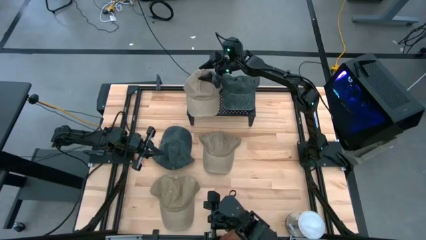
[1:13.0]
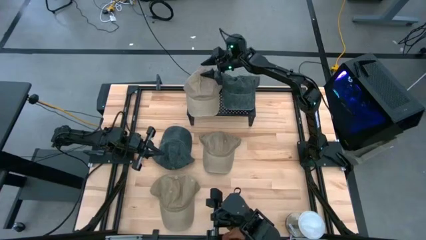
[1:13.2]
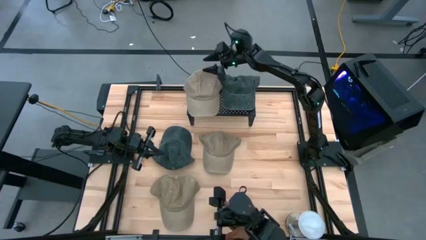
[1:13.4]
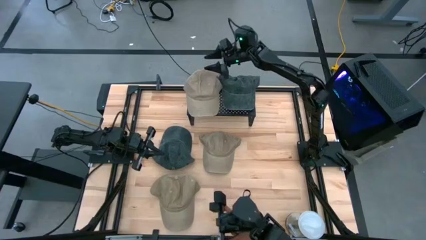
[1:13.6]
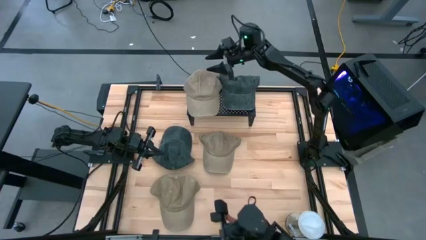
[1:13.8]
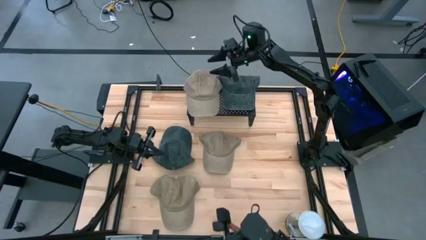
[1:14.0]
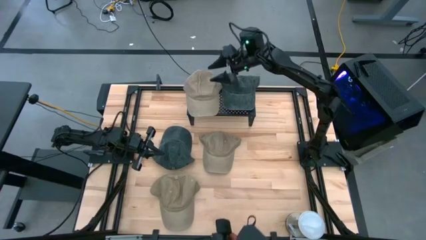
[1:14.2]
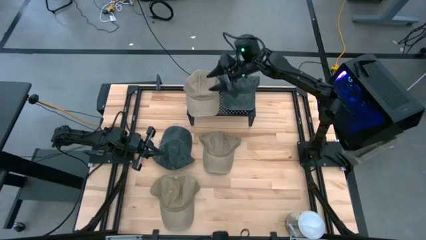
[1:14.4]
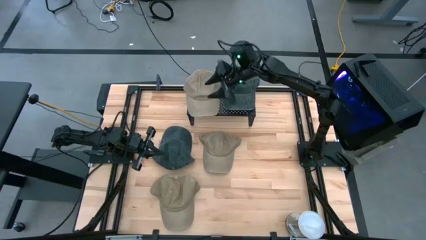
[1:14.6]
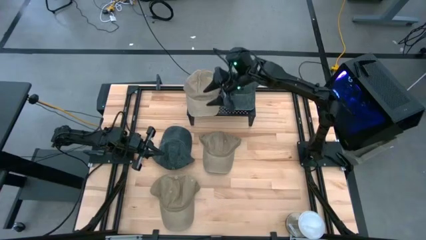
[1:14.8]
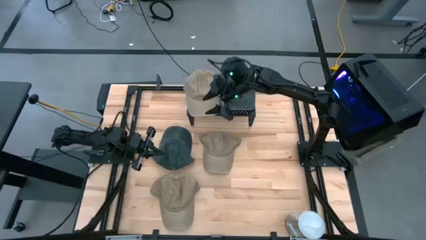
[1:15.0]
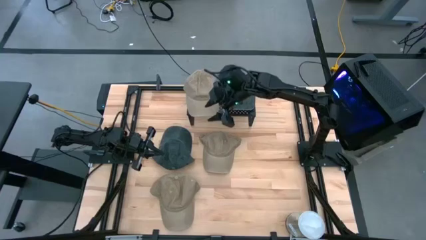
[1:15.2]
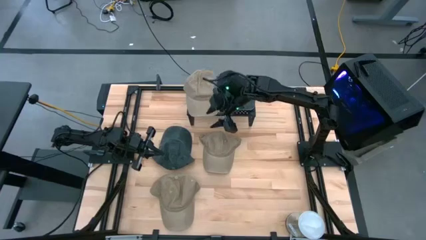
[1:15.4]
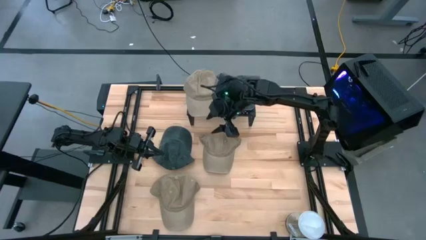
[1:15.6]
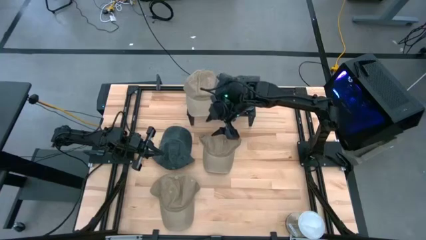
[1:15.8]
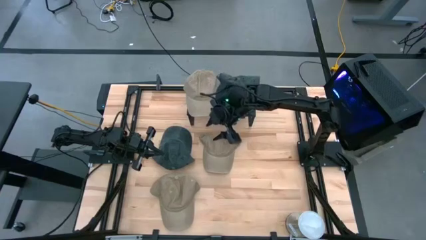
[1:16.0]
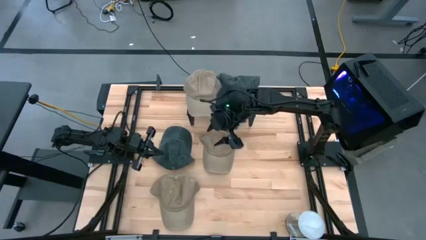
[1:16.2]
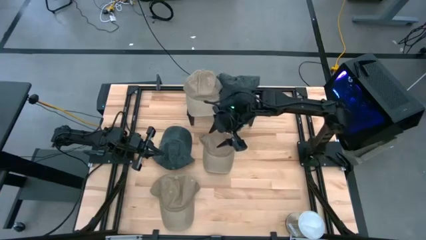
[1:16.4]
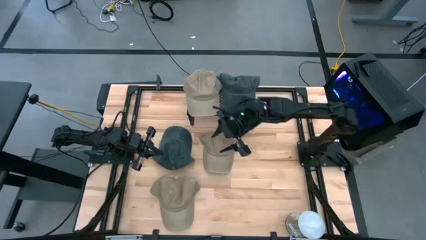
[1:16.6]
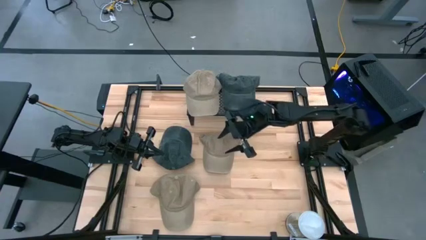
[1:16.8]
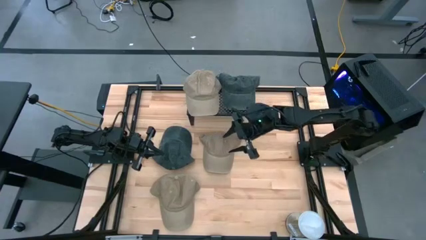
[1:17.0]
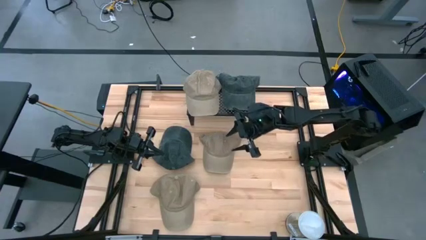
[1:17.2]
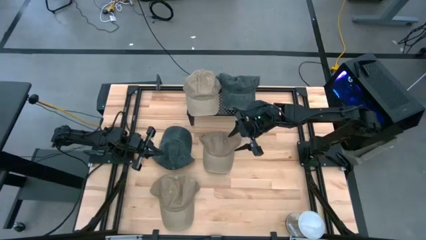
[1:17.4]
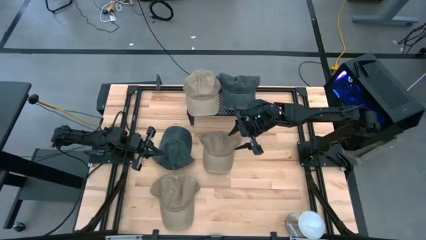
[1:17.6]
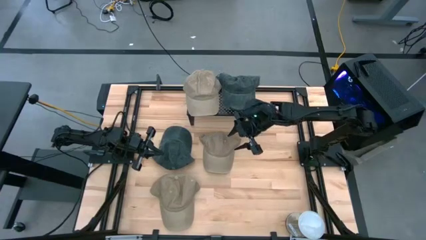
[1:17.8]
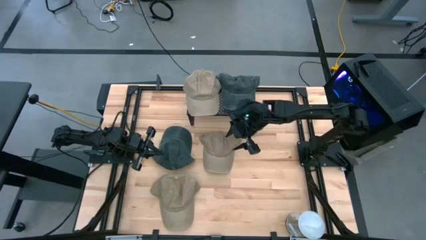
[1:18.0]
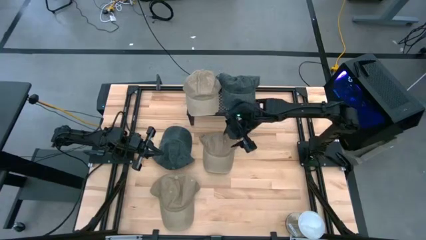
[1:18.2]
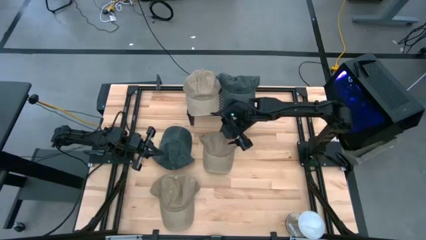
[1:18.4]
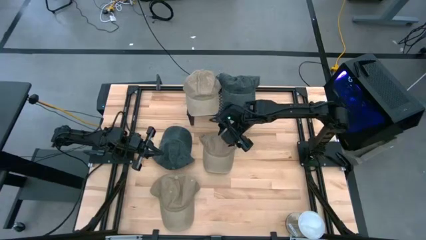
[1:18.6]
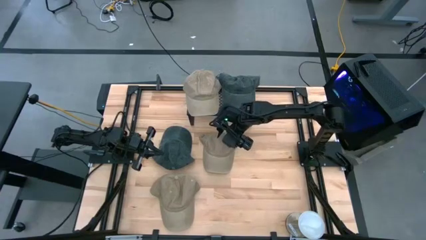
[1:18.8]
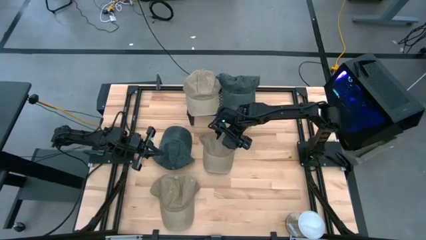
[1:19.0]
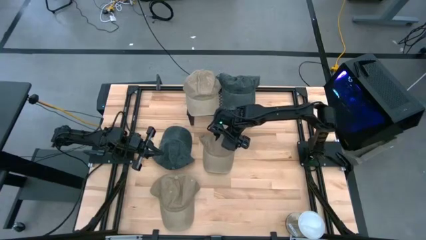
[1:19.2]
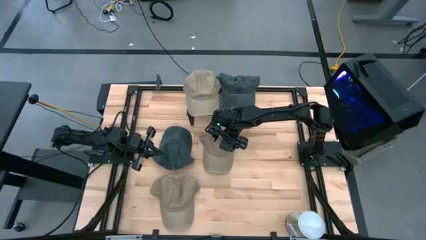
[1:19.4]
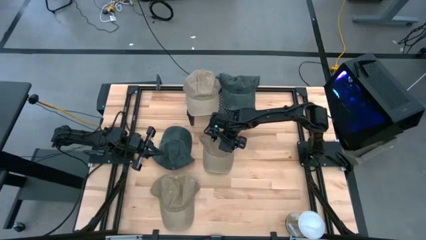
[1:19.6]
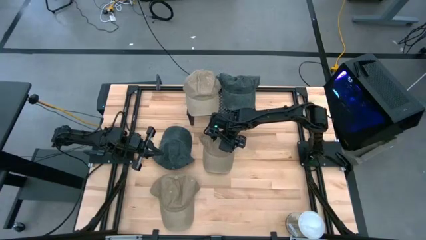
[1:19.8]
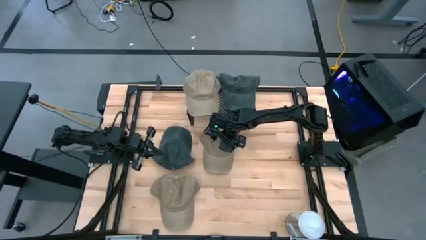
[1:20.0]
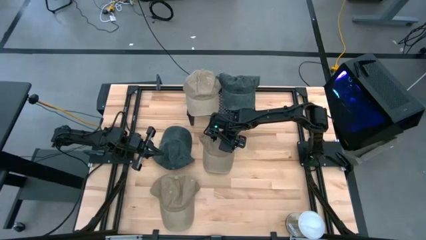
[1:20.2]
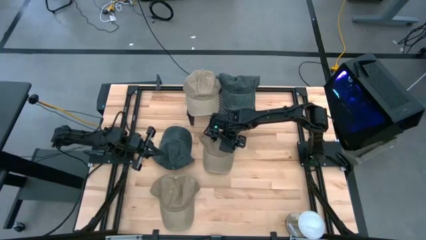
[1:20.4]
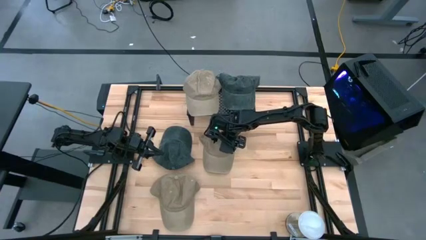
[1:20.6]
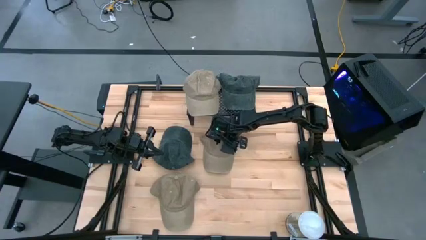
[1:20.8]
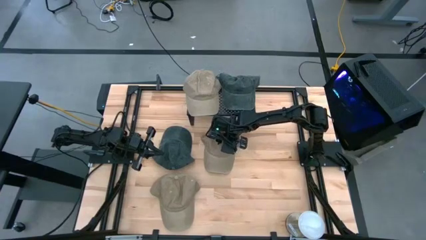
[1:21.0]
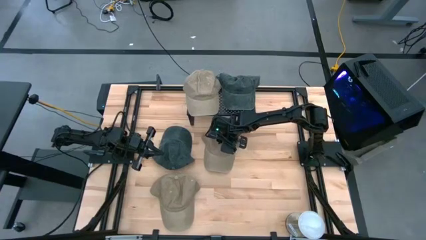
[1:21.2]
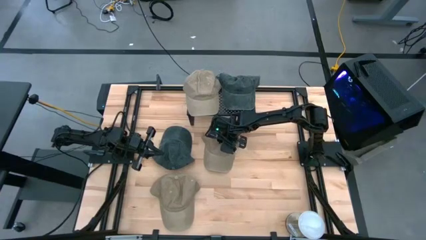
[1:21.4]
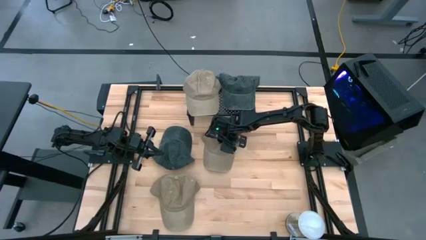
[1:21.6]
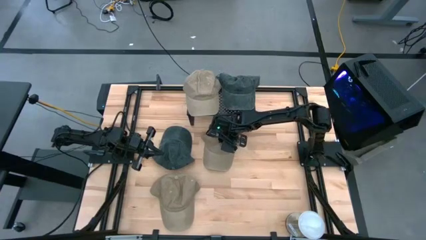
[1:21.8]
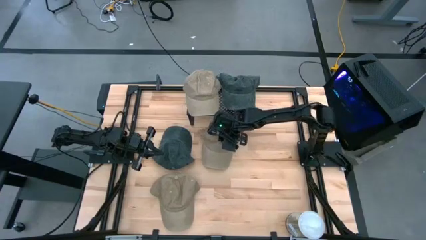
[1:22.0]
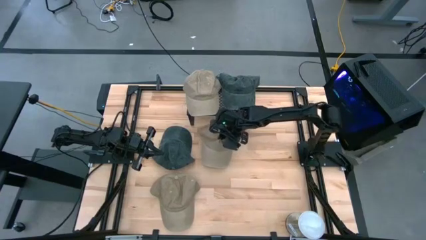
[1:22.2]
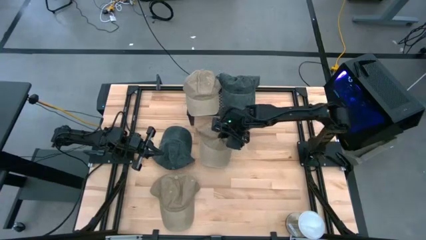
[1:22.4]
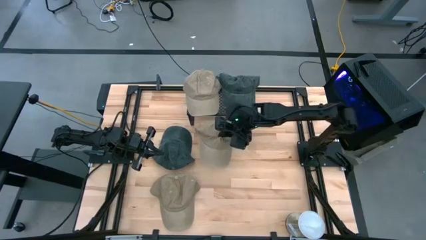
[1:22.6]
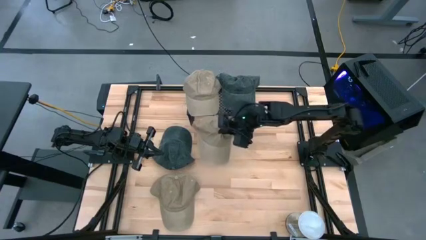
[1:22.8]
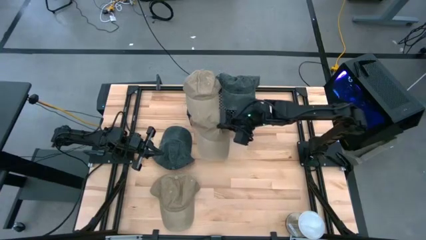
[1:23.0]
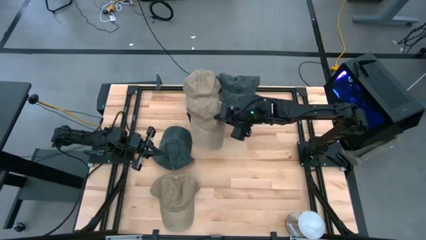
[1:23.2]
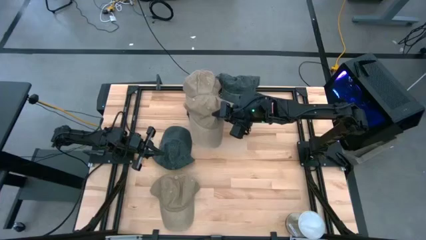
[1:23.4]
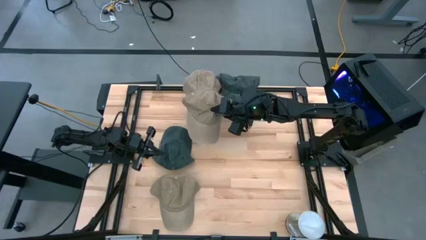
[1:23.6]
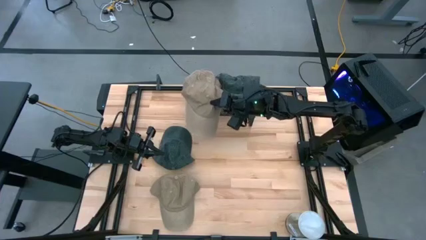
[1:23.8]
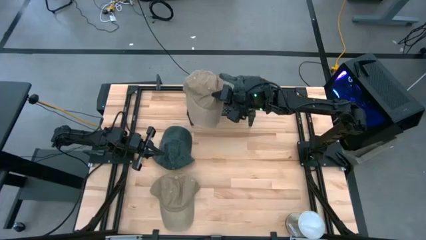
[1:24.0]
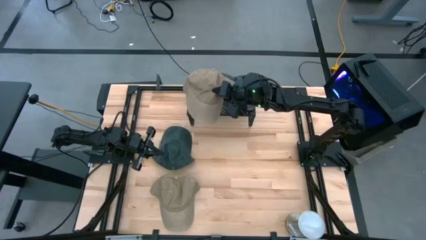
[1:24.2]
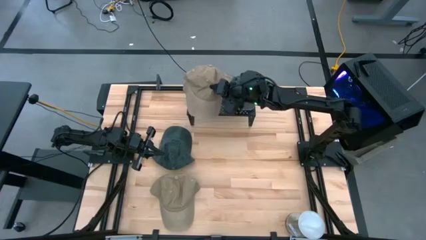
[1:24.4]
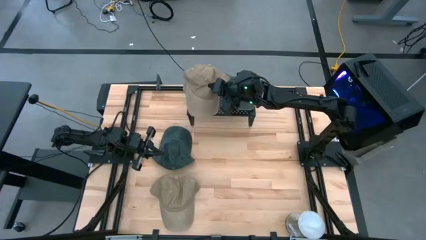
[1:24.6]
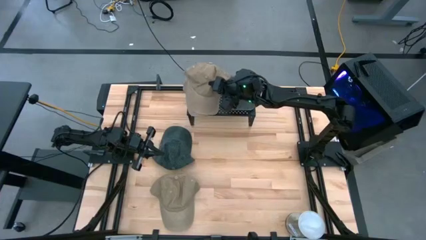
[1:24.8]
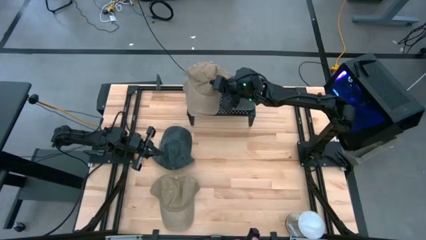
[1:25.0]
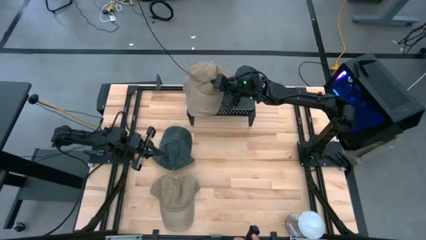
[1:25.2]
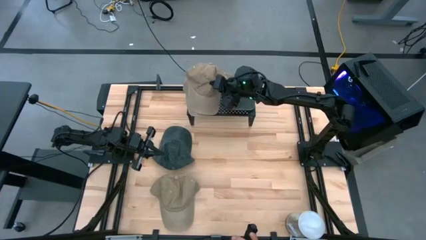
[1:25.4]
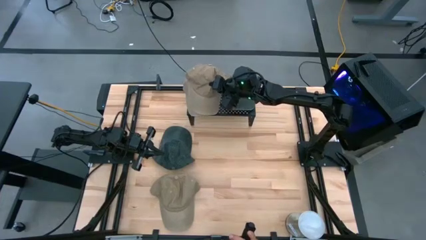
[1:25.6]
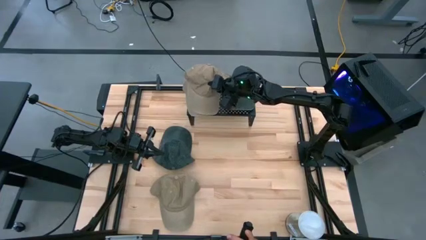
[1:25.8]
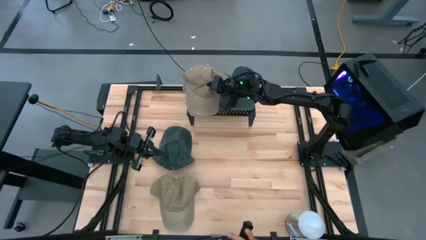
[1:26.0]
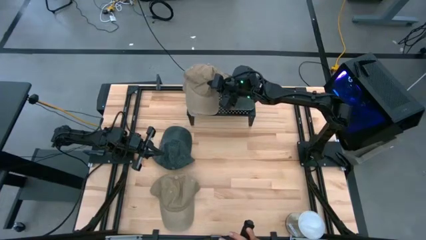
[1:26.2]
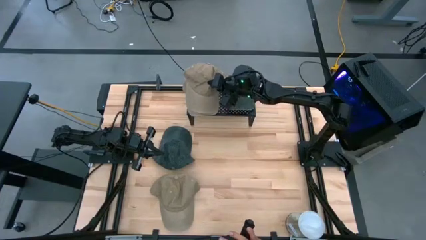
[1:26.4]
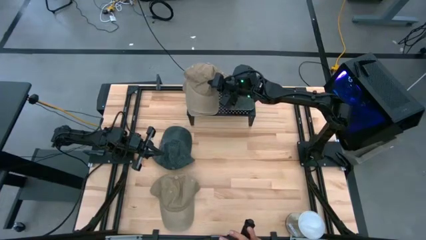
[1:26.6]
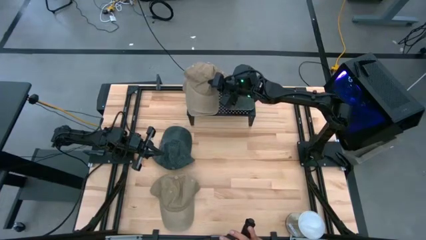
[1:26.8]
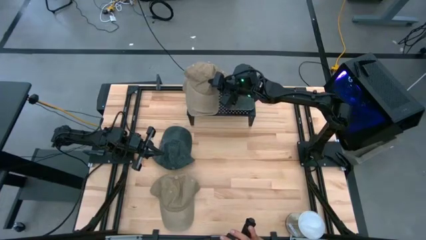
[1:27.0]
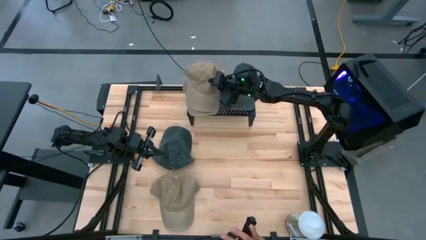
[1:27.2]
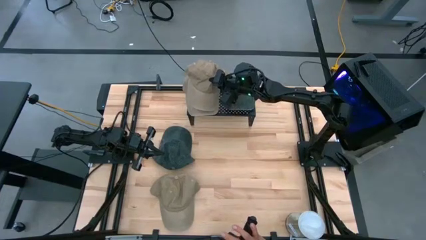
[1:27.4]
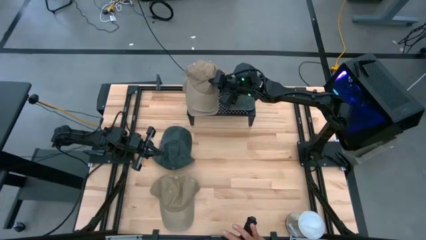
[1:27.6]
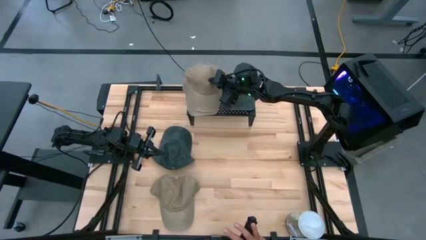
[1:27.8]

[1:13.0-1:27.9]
Task: Pick & Place hat
Stack the top brown cap on the other brown cap on the shelf
